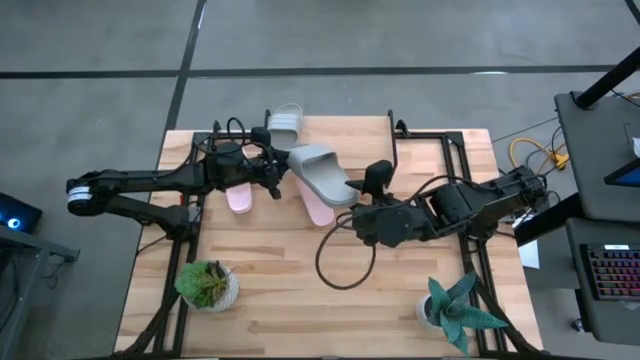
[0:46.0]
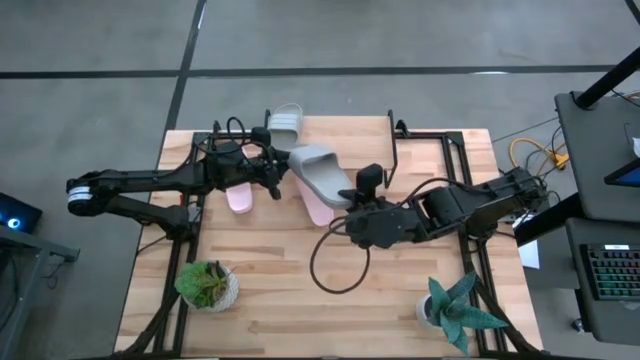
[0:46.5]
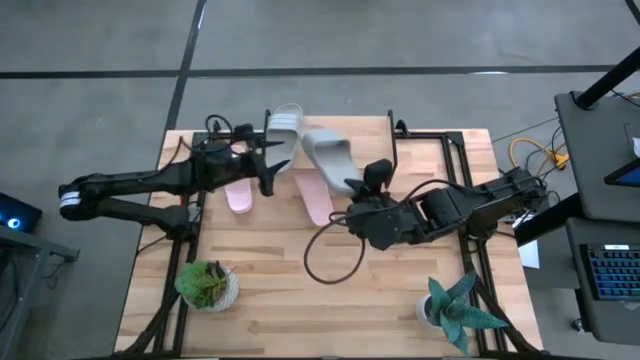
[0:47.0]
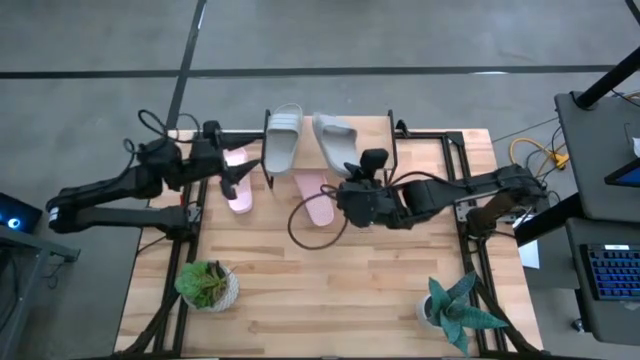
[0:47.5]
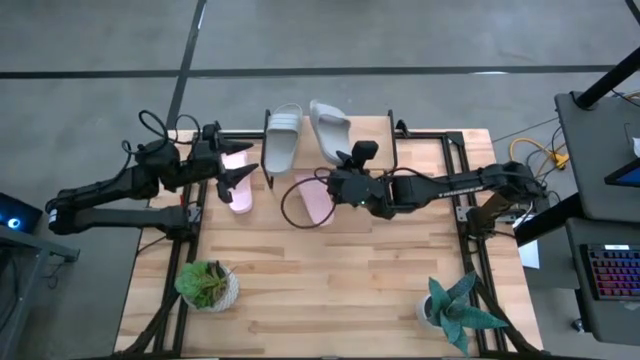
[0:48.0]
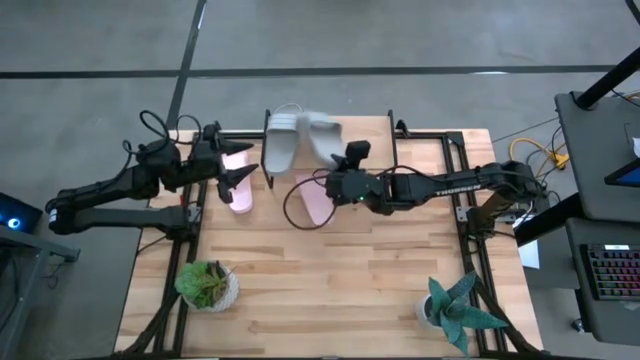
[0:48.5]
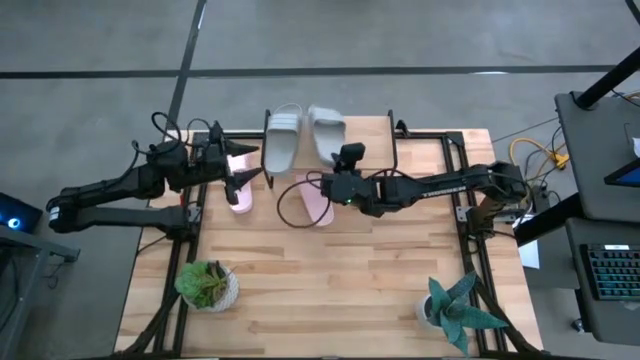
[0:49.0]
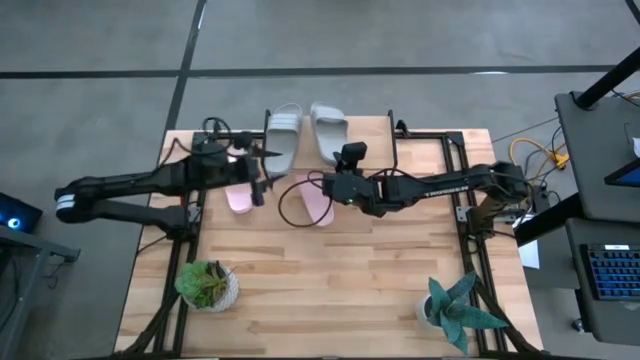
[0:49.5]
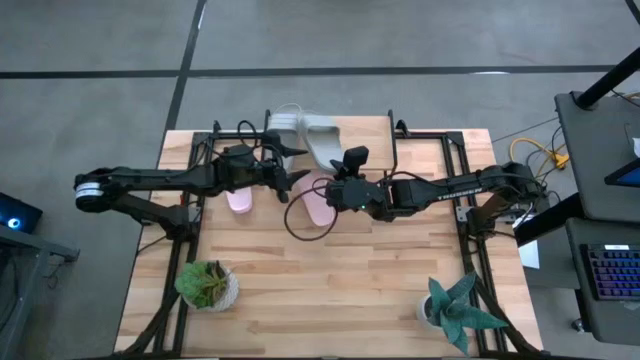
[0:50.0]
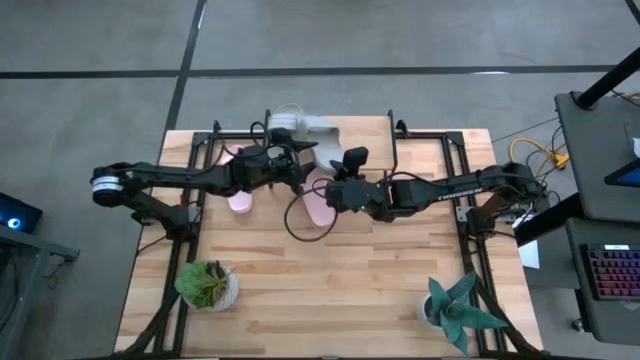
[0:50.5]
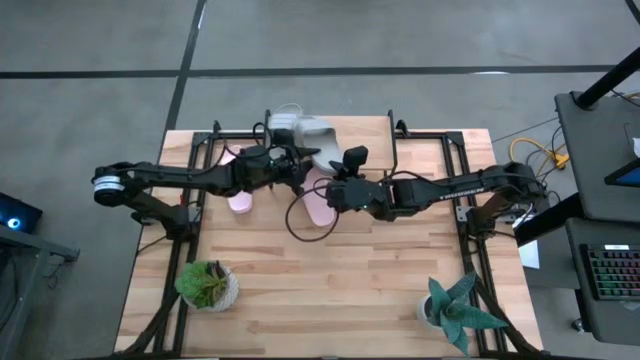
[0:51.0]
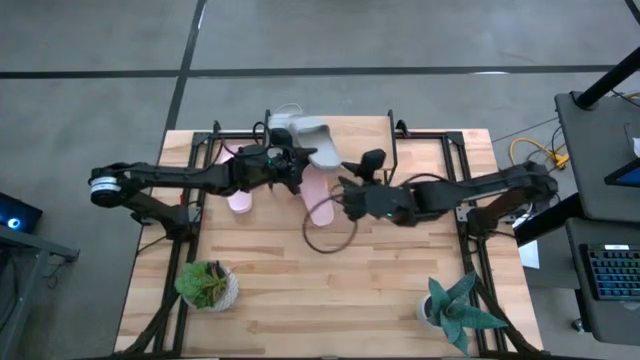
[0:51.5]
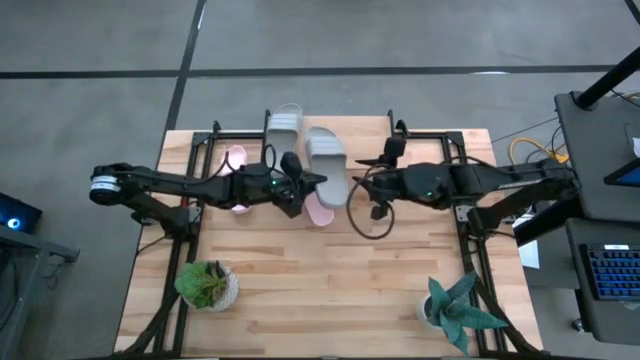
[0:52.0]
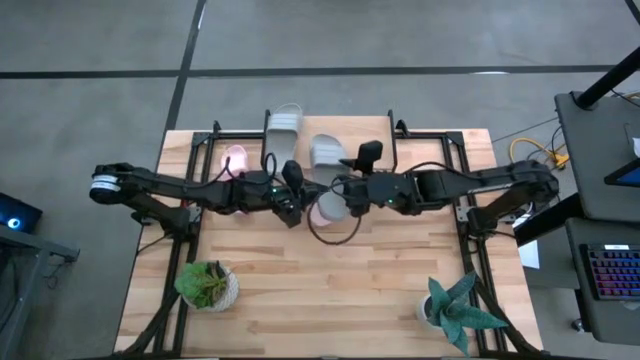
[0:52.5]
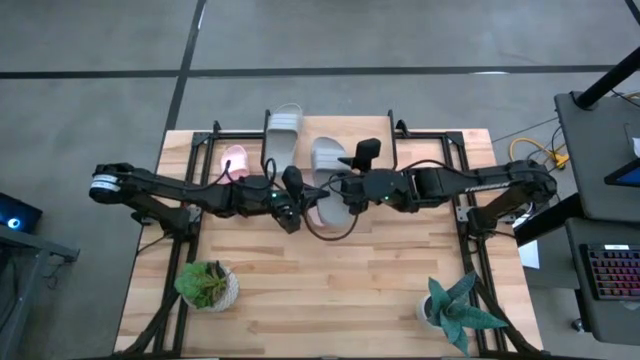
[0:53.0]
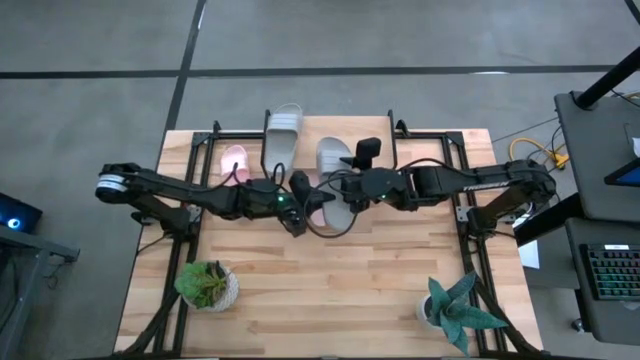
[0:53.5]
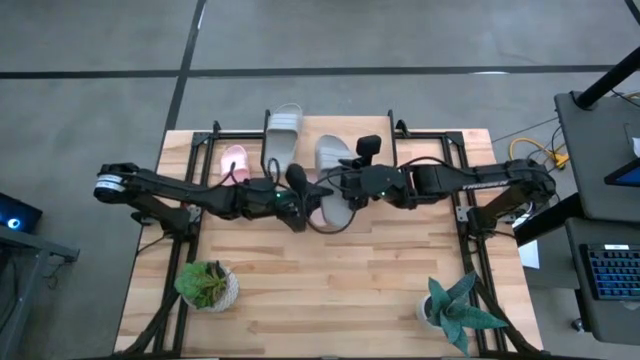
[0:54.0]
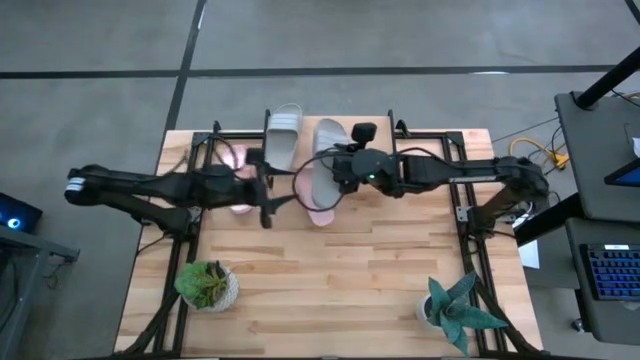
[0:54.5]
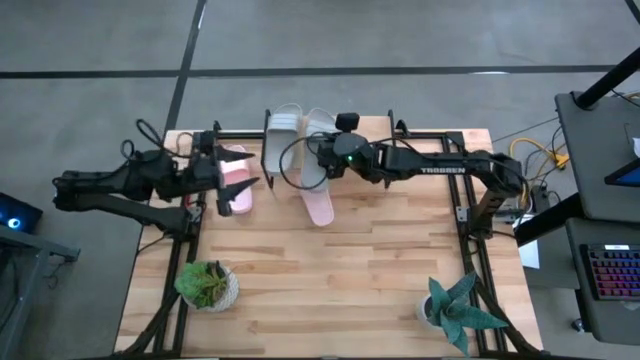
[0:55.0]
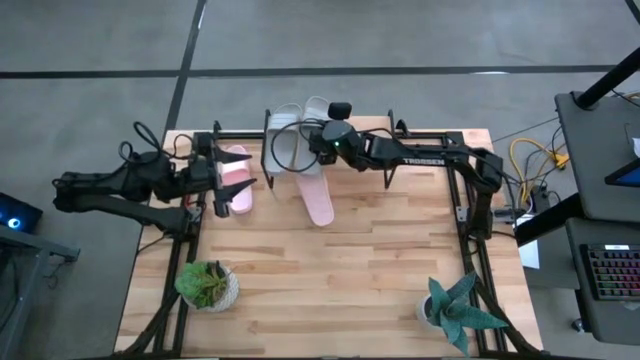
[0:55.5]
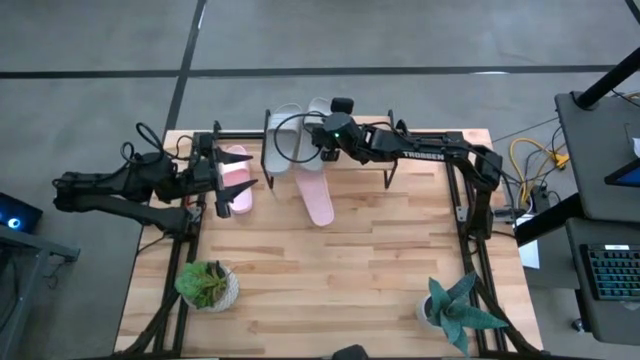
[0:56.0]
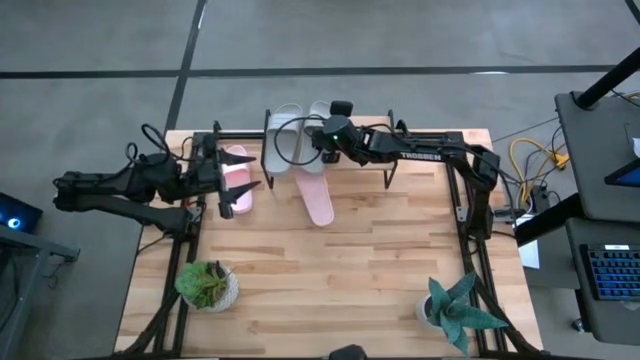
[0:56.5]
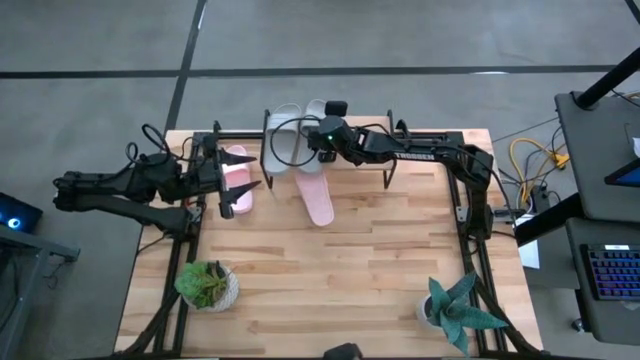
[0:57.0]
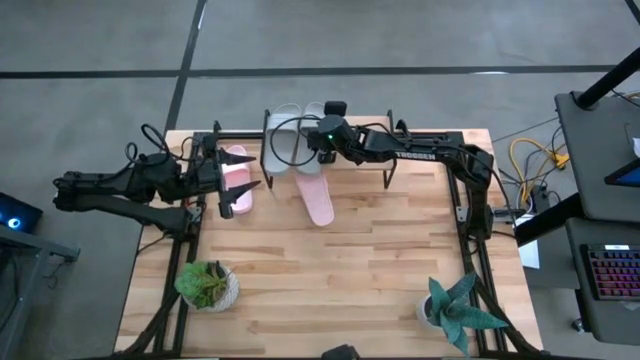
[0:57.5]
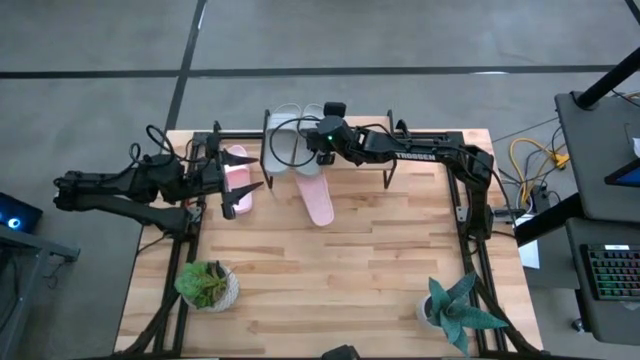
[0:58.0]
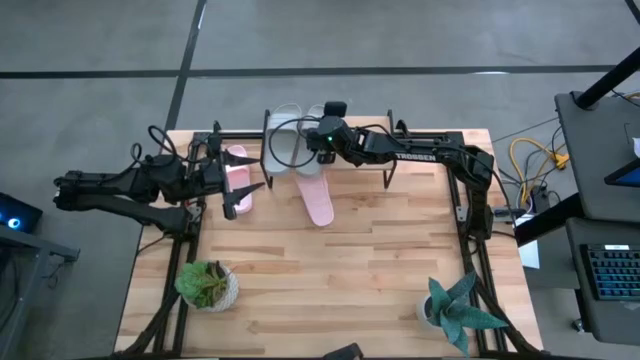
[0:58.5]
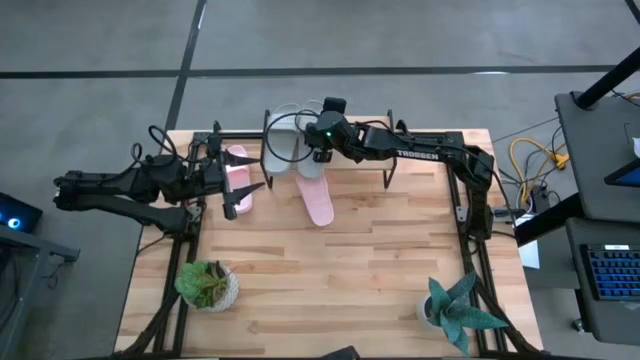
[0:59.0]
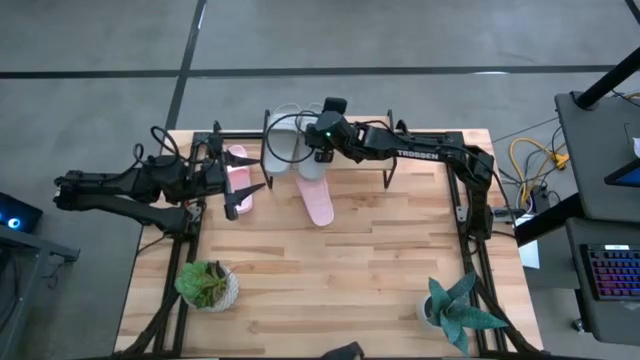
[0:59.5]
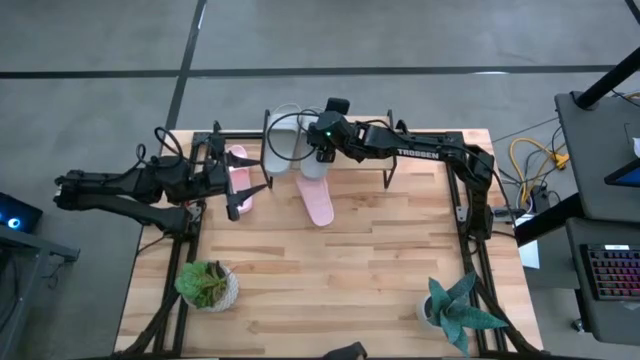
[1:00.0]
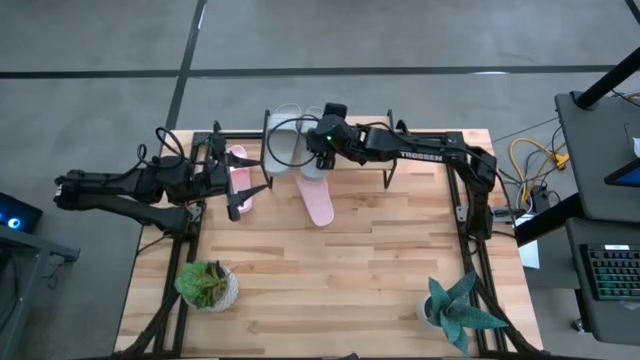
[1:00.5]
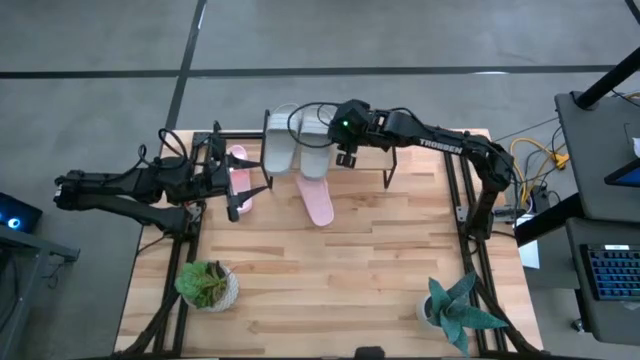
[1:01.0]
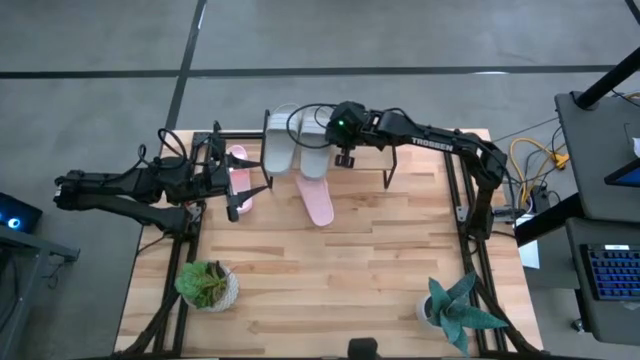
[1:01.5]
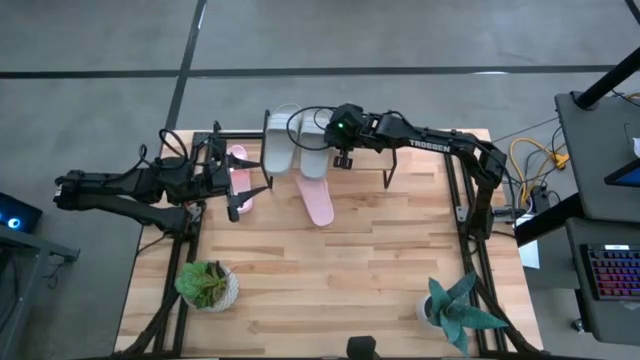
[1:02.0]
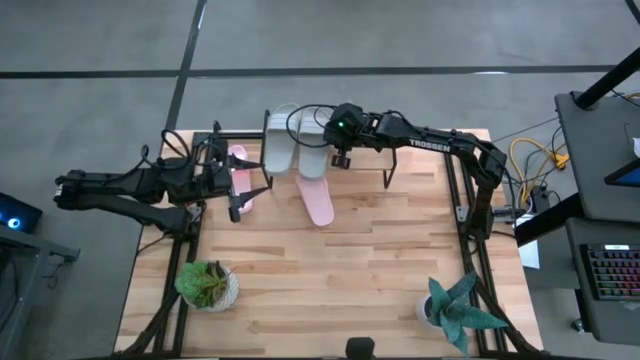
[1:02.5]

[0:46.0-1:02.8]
Task: Pick and place slides into the shelf
Put the gray slide on the shelf

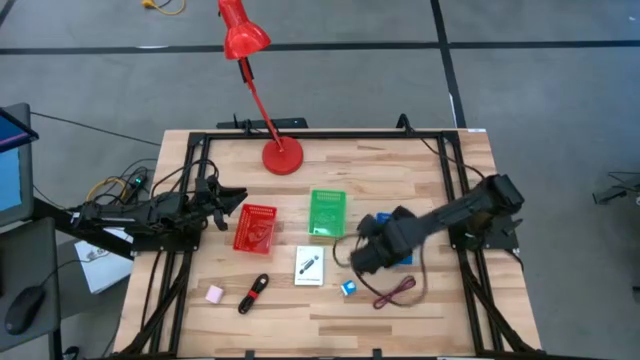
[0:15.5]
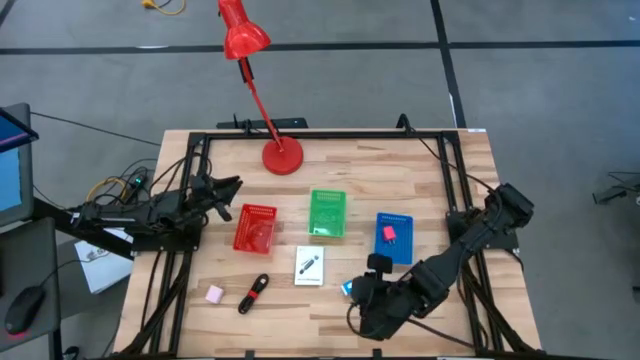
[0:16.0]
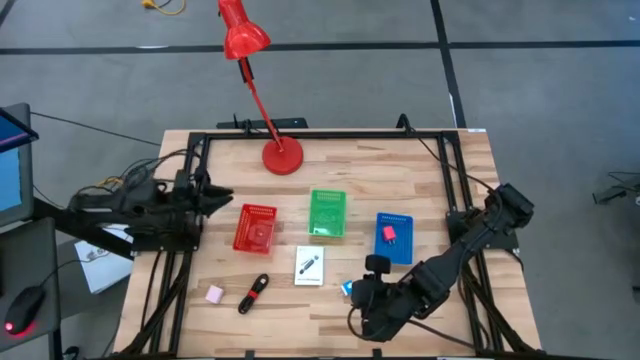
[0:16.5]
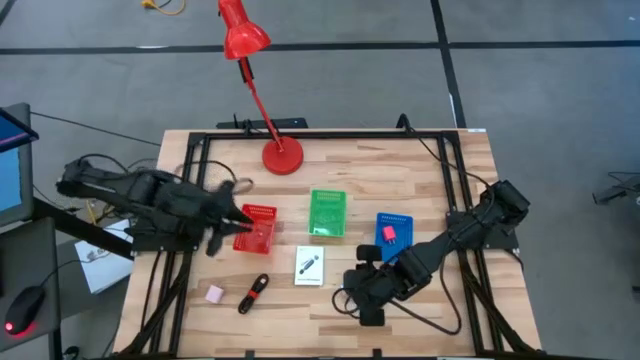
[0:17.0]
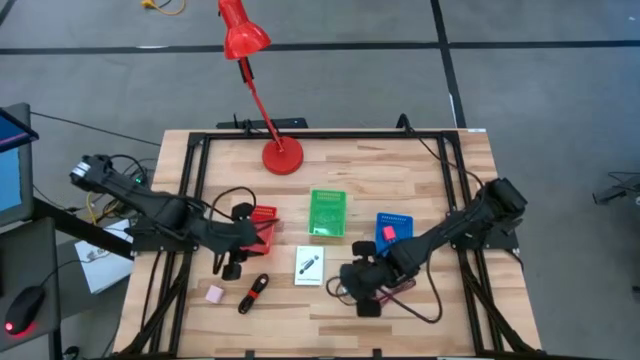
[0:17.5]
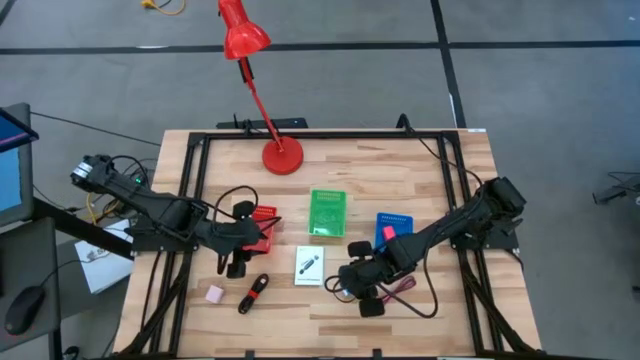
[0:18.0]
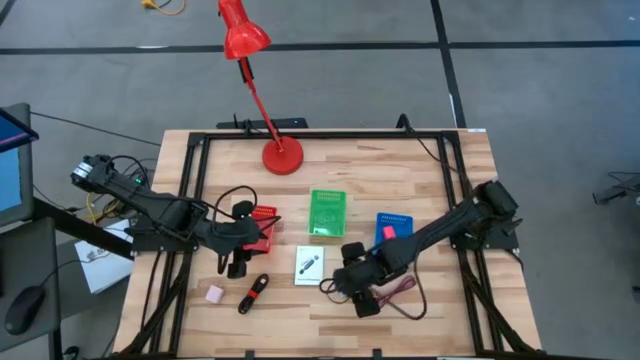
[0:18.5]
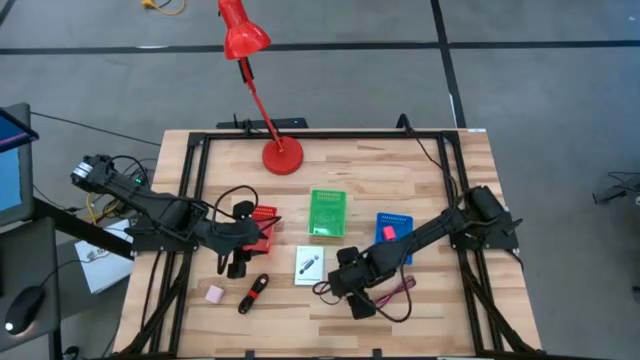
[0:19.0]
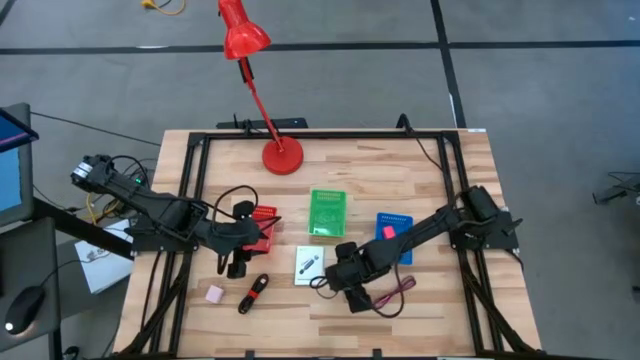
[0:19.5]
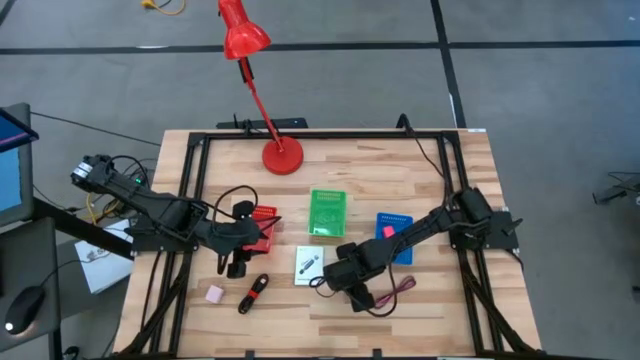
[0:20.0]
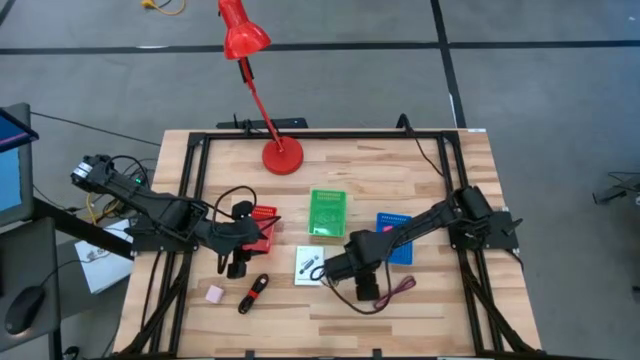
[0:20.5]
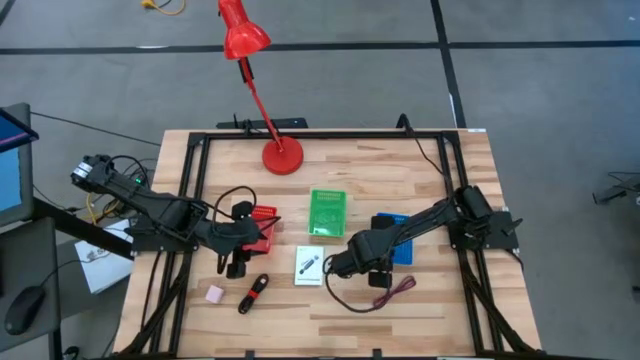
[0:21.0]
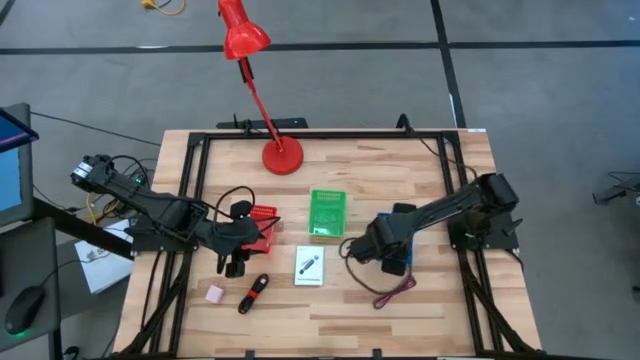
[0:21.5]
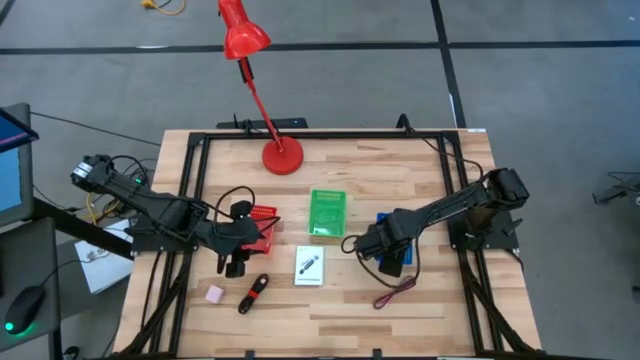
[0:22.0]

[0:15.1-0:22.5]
Task: Pick and place items into bin
Put the blue charger adapter into the blue bin
